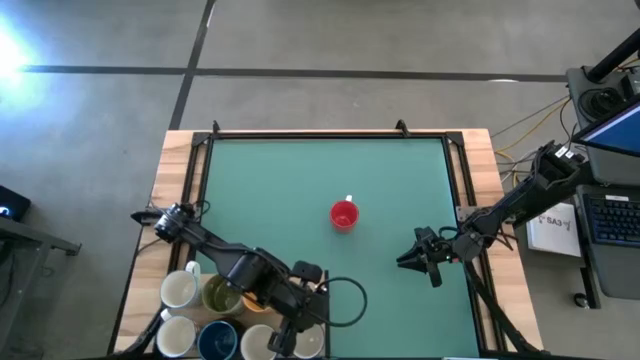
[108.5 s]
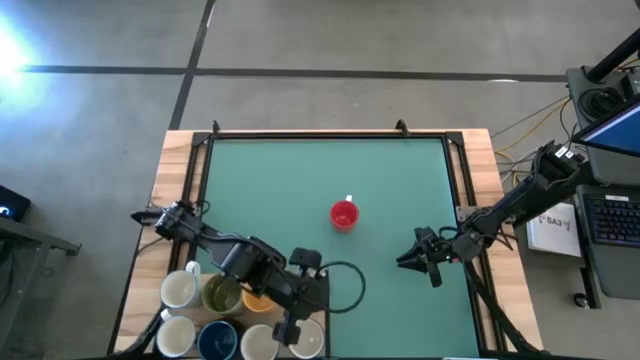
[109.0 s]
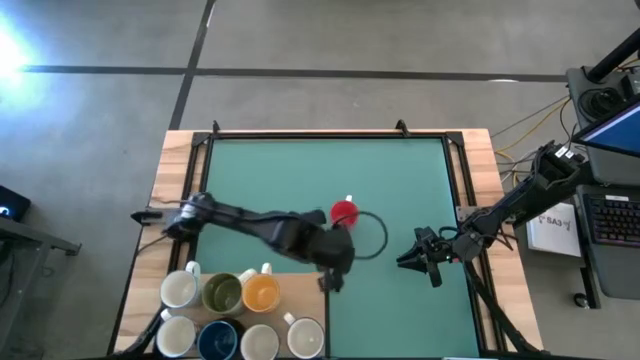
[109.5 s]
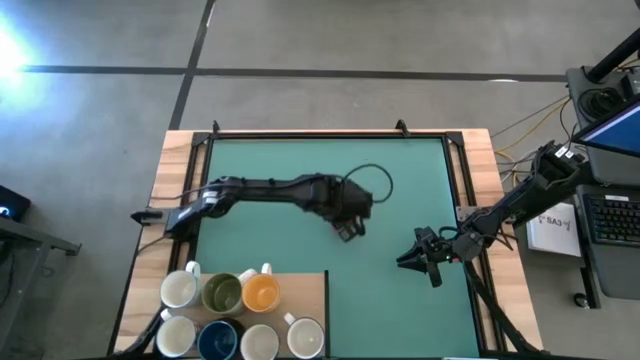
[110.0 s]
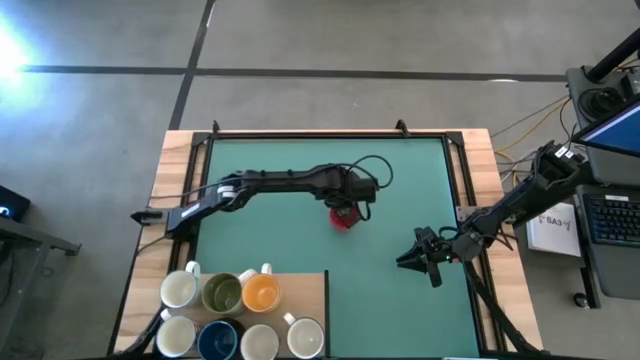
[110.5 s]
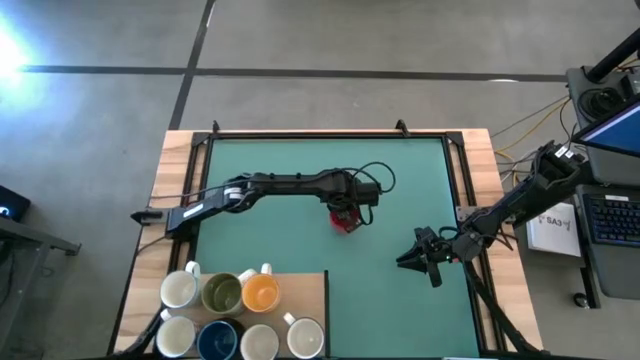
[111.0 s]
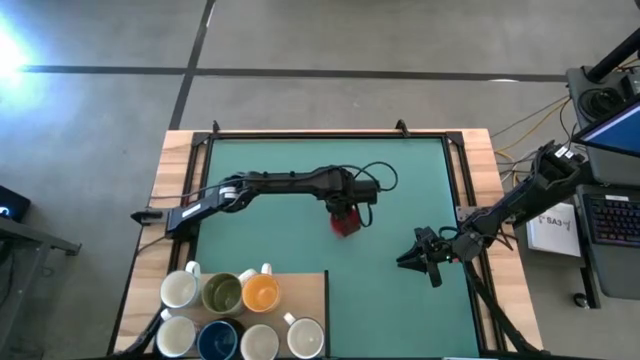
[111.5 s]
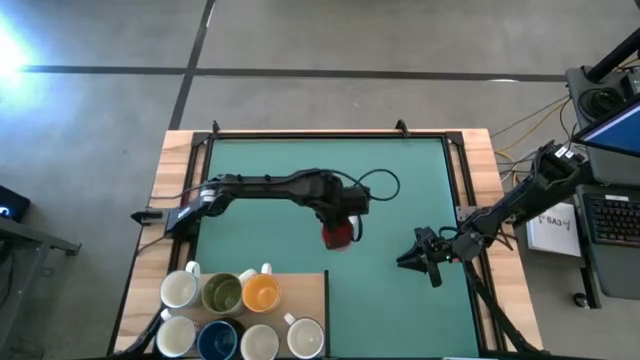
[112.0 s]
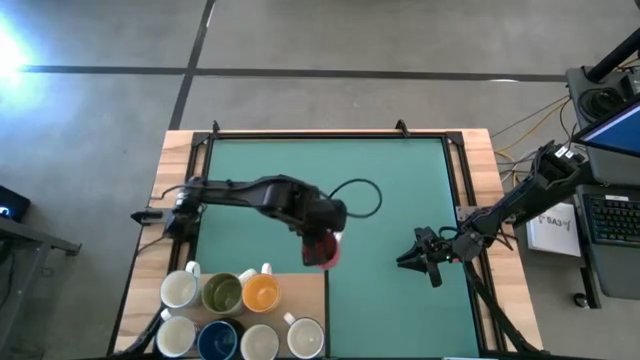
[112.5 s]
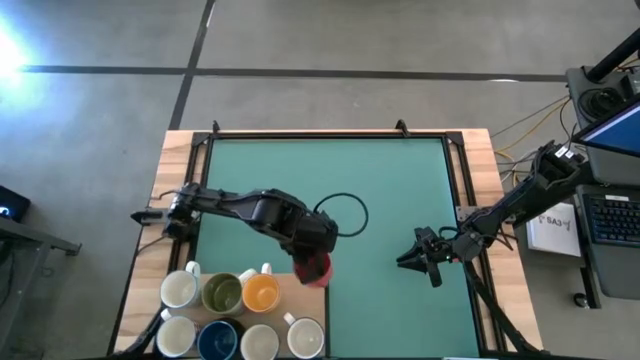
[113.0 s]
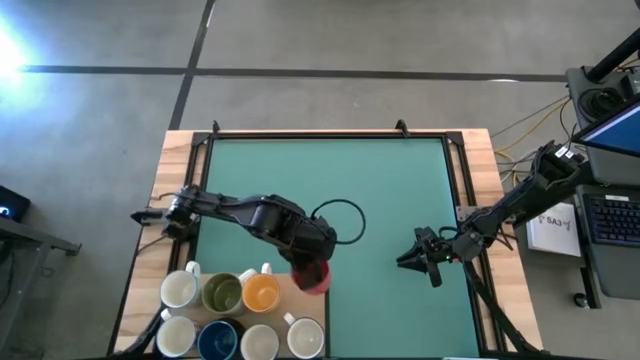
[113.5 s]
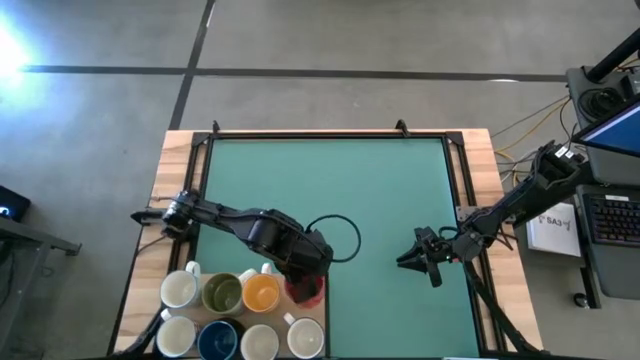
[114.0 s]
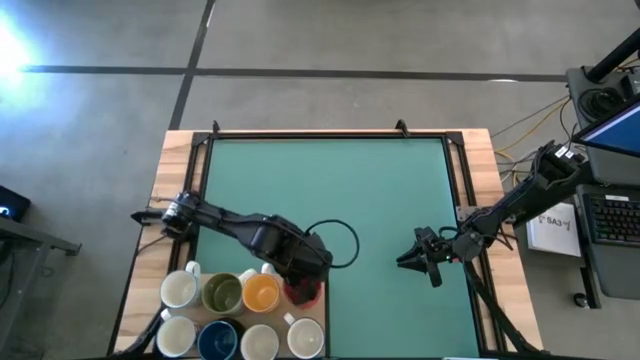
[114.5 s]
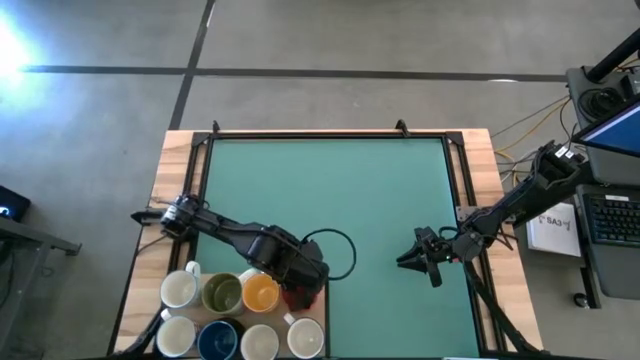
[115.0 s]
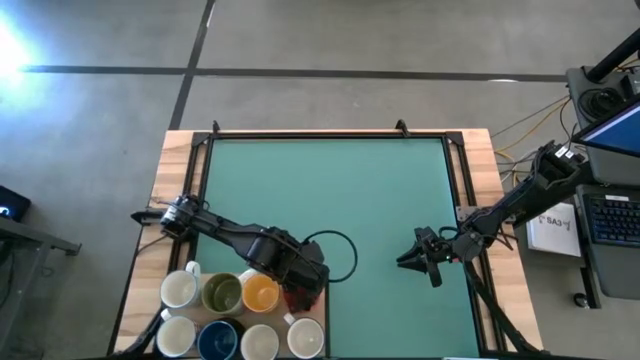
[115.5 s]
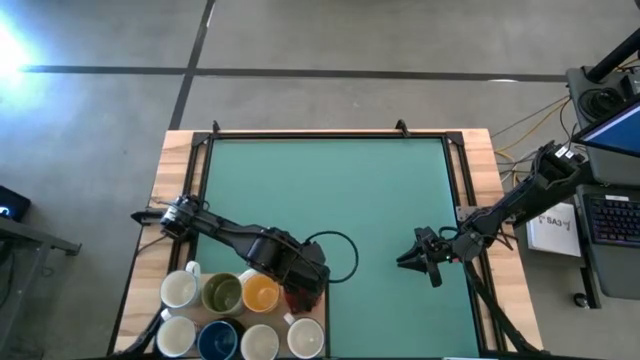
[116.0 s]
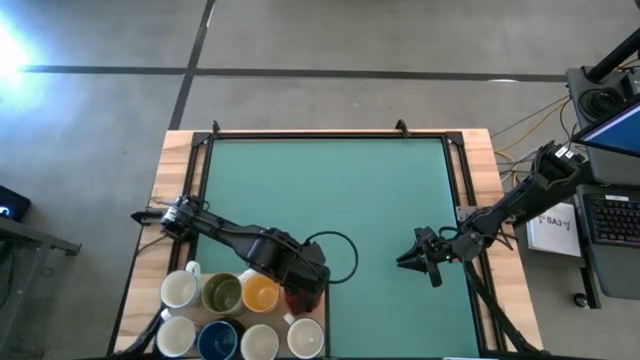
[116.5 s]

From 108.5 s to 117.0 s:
Task: Place coffee mugs
Put the red mug on the shelf

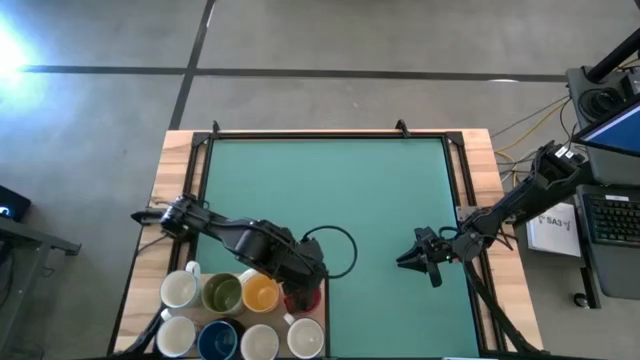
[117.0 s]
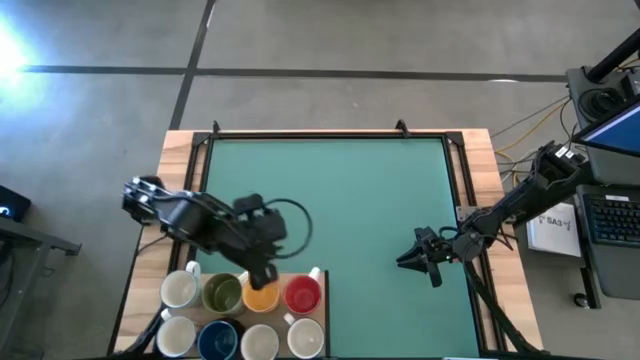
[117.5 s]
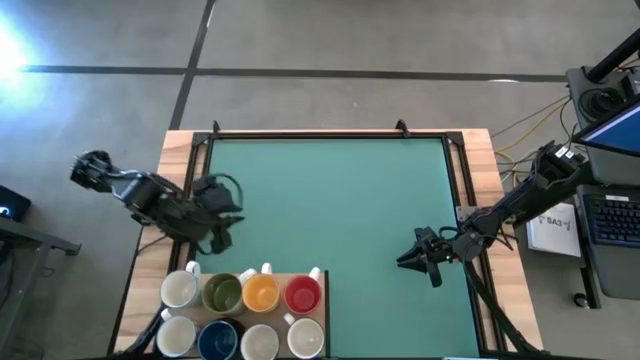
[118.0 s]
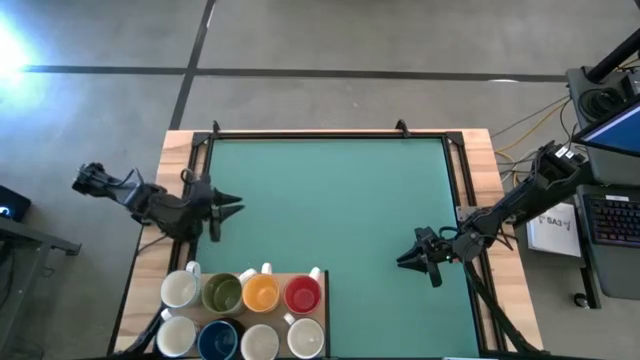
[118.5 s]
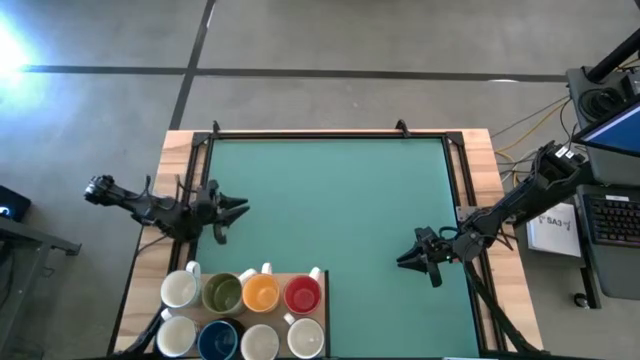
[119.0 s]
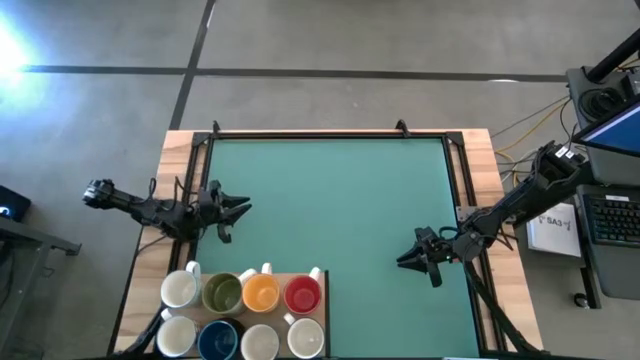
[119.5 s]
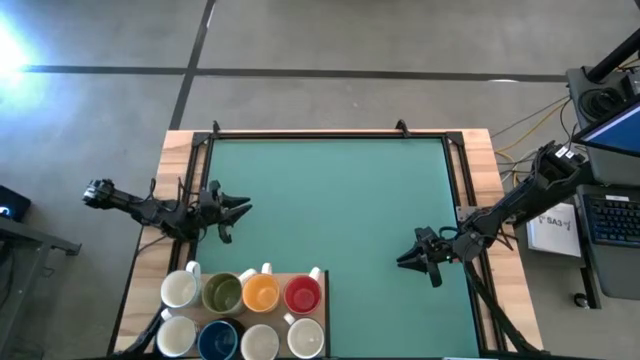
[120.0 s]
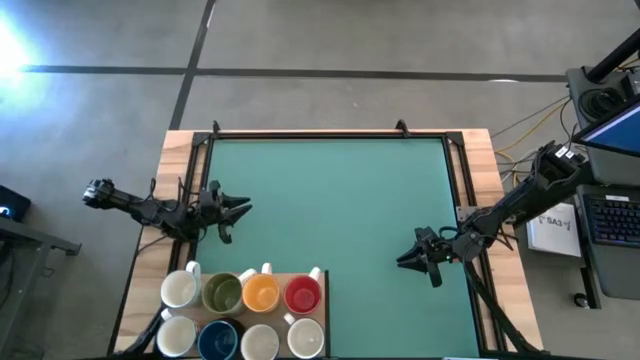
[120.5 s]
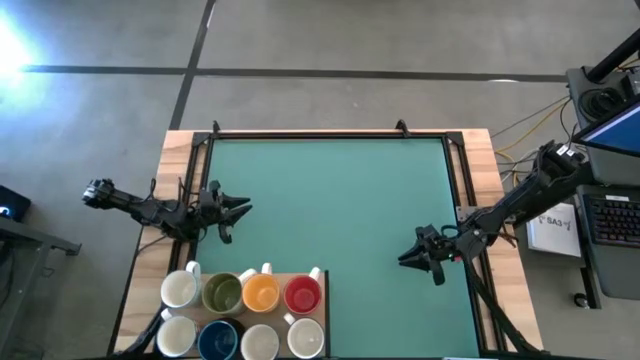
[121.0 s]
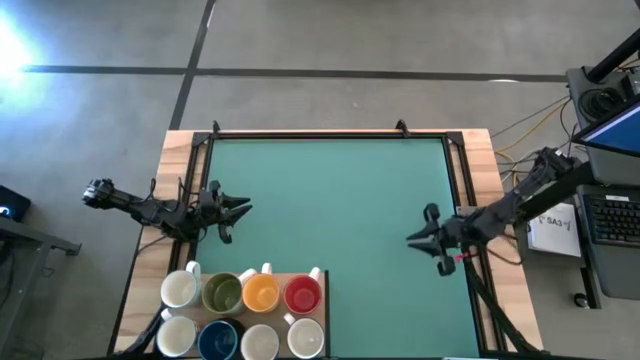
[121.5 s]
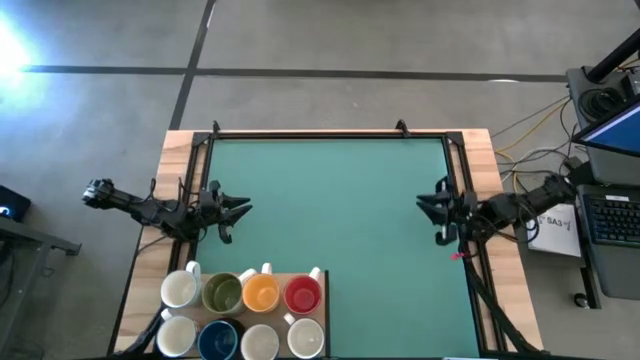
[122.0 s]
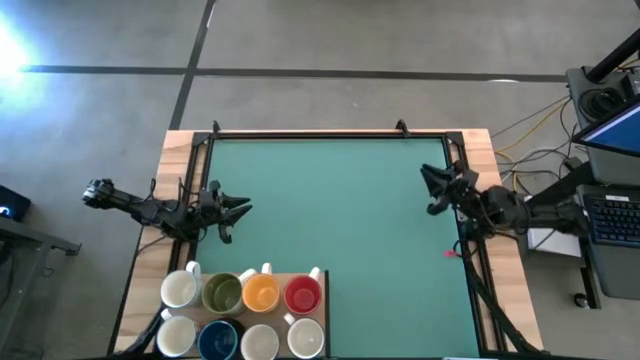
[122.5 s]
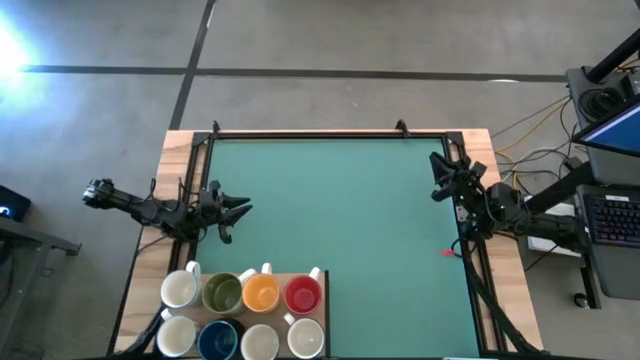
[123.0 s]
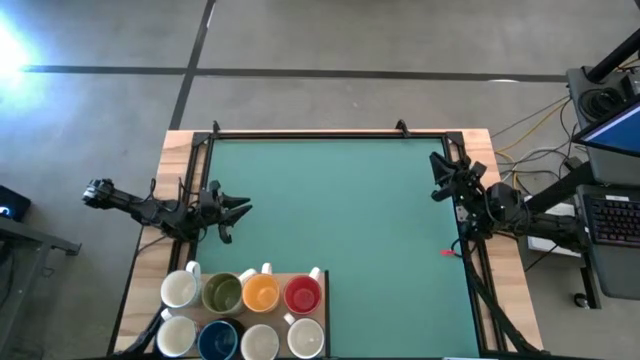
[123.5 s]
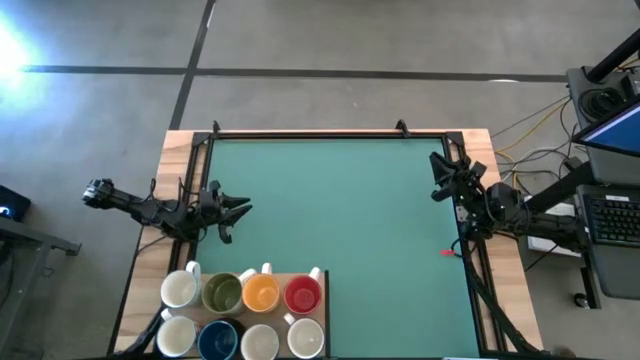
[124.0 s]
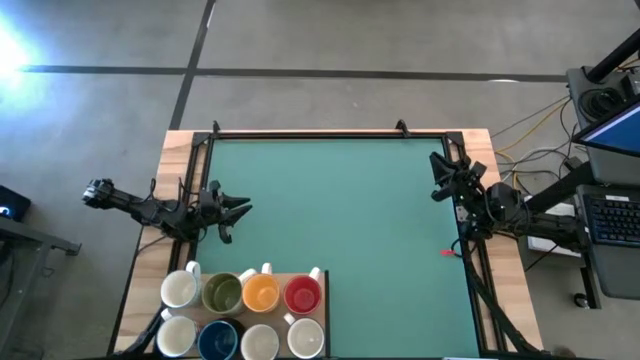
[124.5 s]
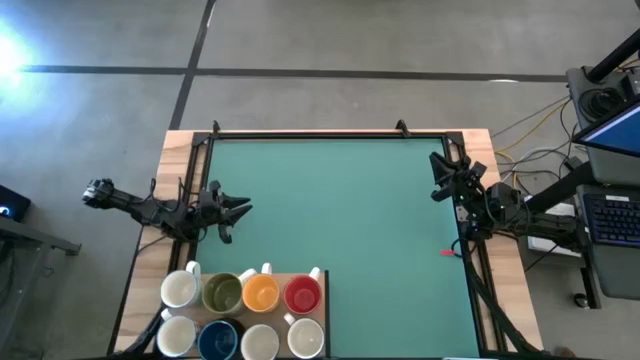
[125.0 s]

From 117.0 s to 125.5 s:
Return to Home Position

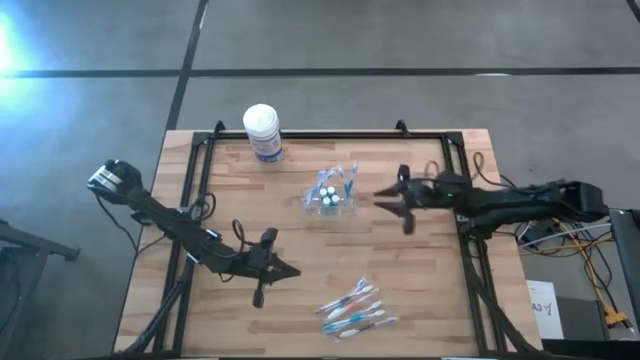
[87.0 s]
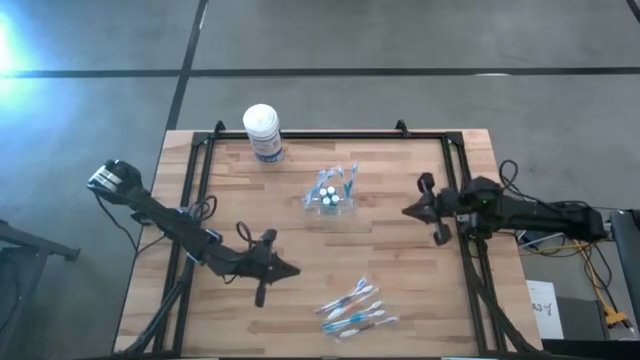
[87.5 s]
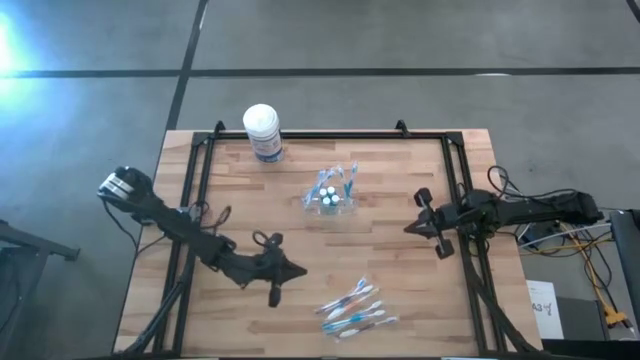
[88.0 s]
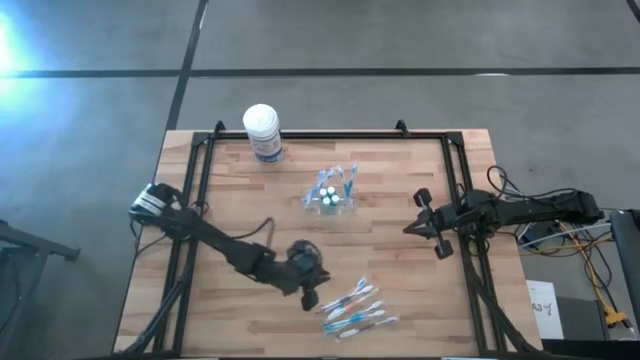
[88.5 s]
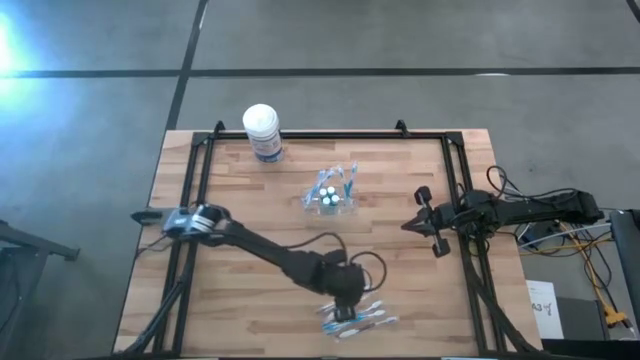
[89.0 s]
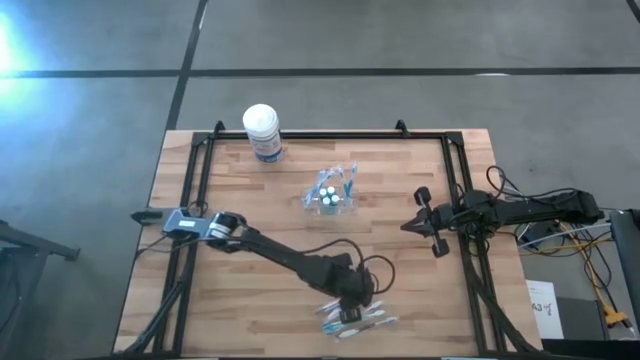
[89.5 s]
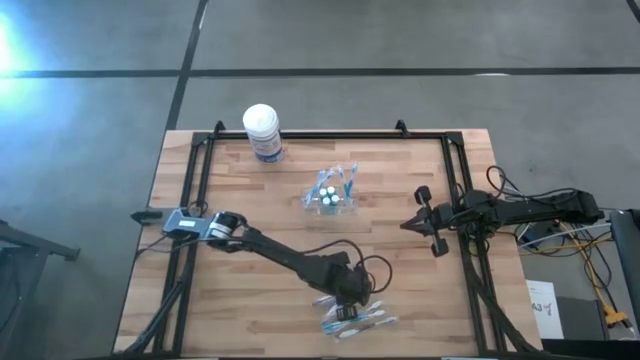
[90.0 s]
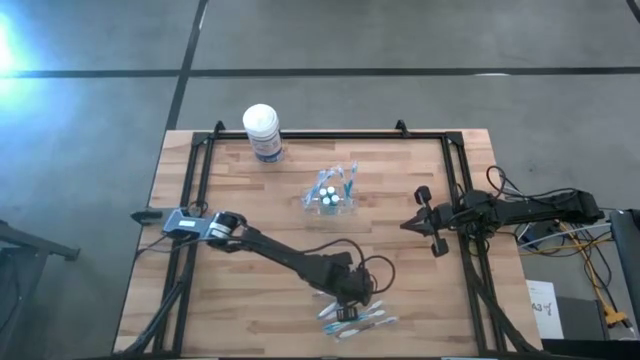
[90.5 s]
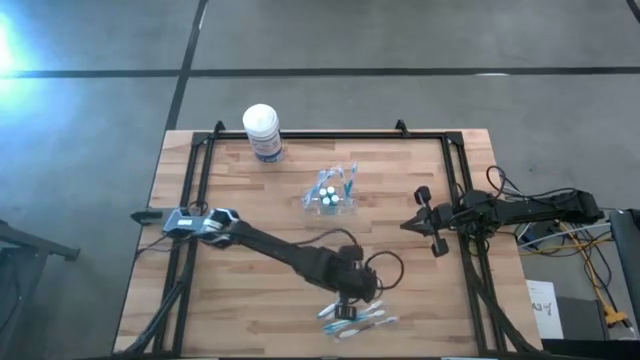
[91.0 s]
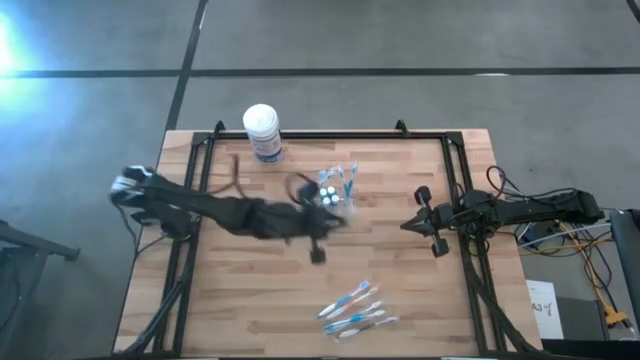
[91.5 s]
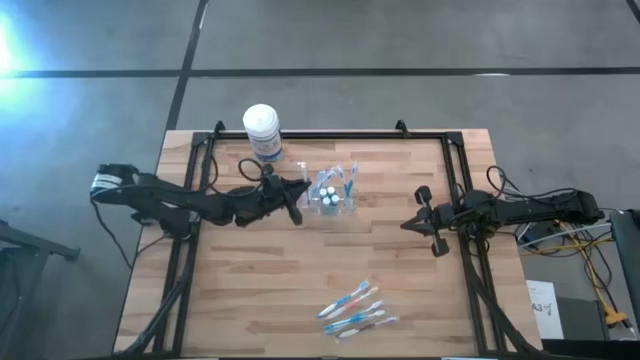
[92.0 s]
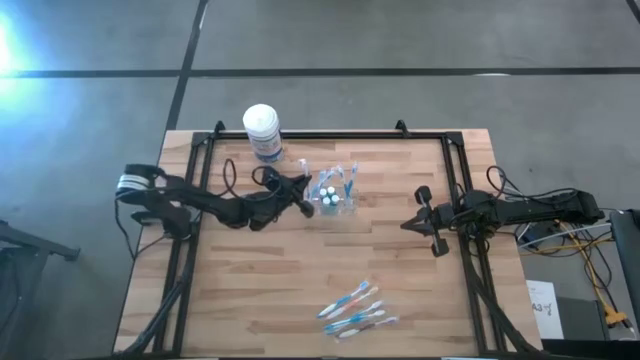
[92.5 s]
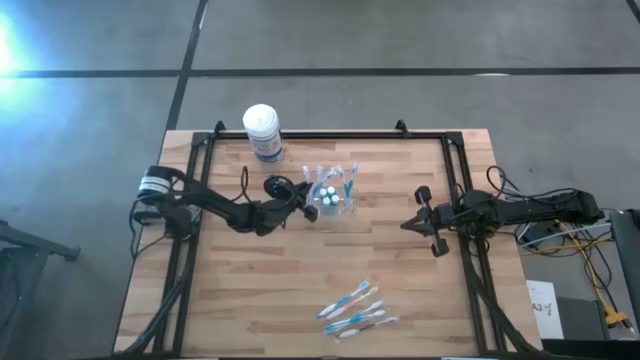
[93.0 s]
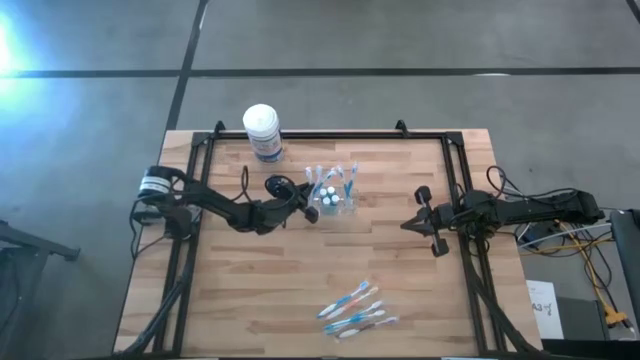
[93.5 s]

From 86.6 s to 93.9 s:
Task: Pick & Place toothbrushing station
Put the purple toothbrush into the transparent organizer
